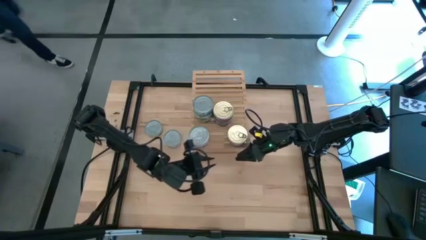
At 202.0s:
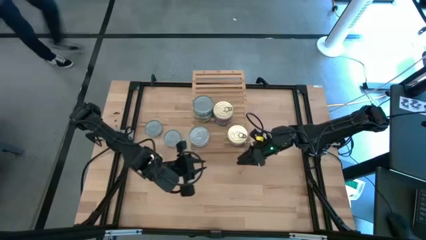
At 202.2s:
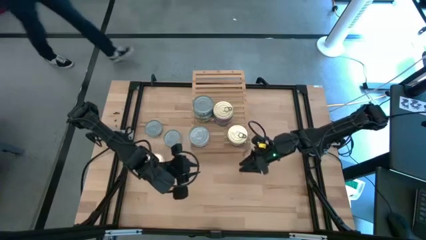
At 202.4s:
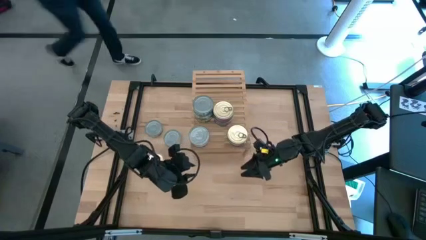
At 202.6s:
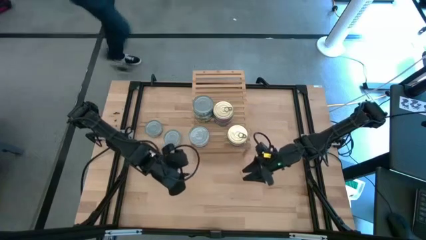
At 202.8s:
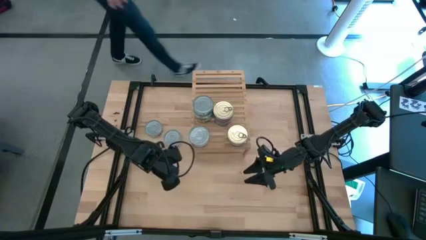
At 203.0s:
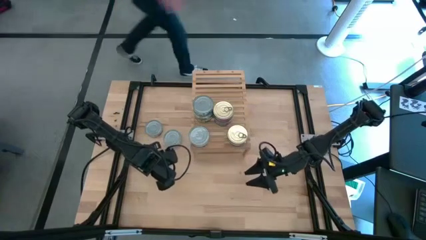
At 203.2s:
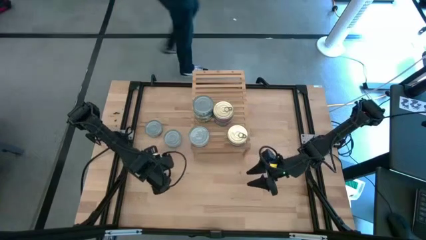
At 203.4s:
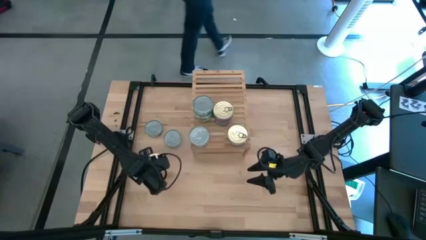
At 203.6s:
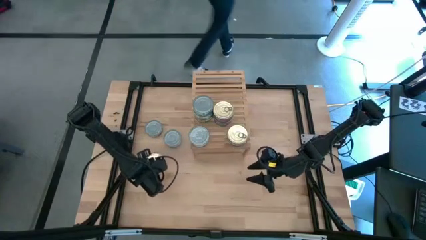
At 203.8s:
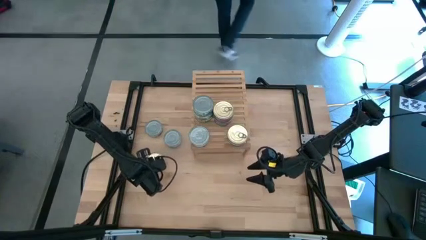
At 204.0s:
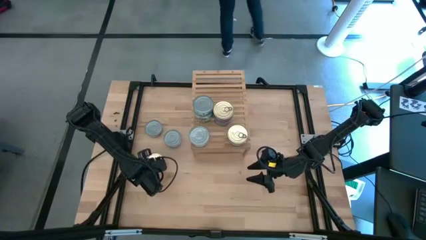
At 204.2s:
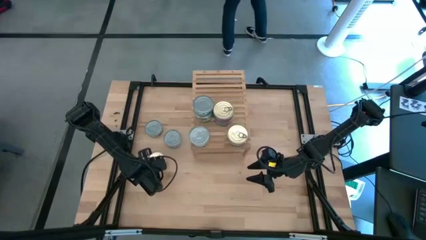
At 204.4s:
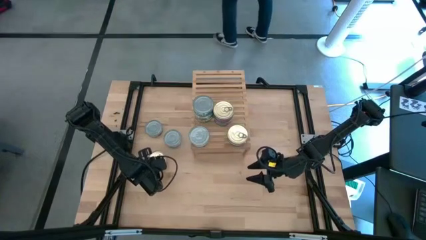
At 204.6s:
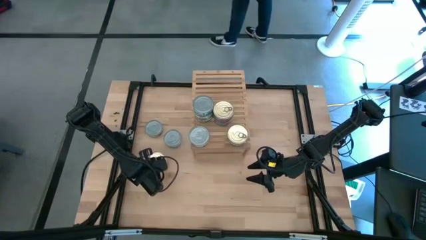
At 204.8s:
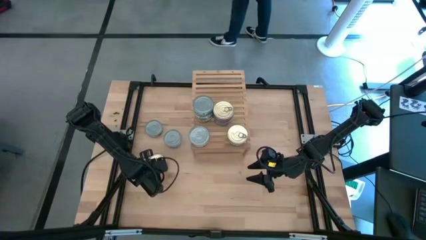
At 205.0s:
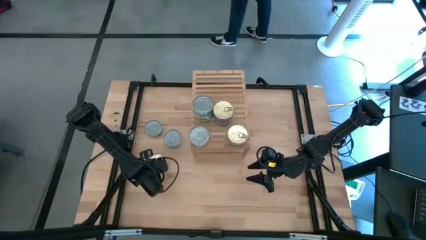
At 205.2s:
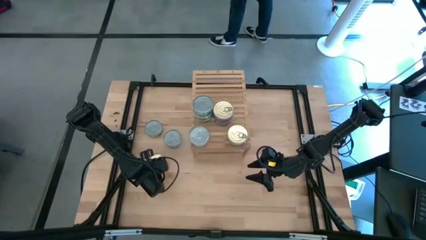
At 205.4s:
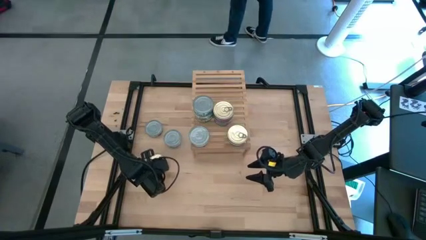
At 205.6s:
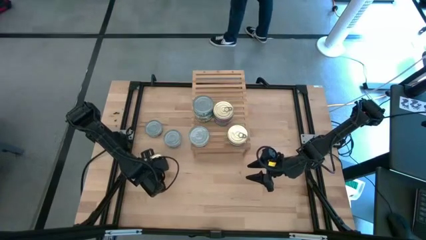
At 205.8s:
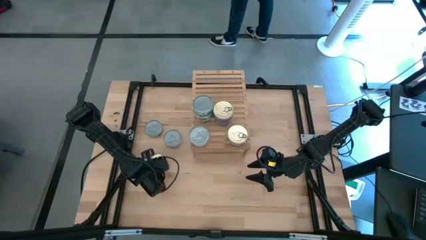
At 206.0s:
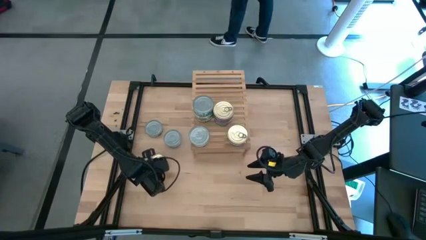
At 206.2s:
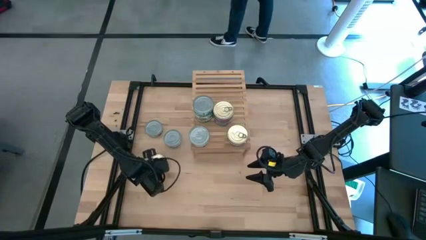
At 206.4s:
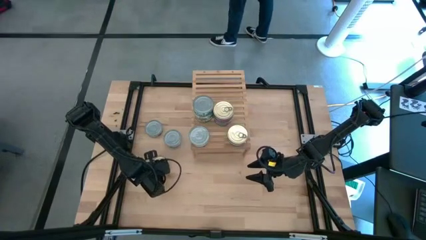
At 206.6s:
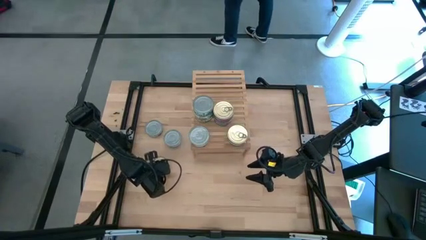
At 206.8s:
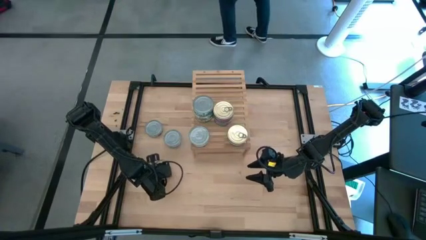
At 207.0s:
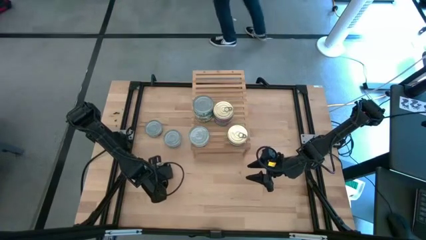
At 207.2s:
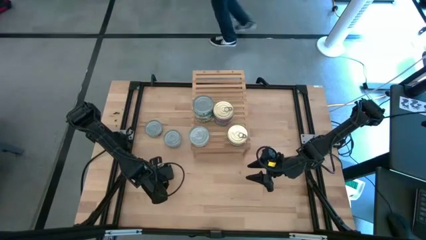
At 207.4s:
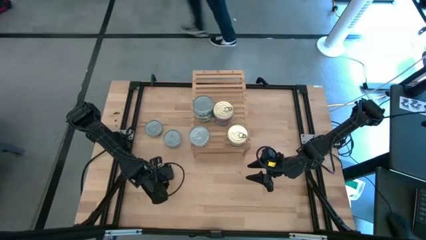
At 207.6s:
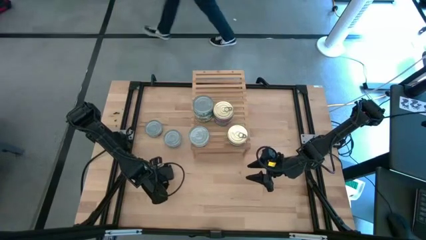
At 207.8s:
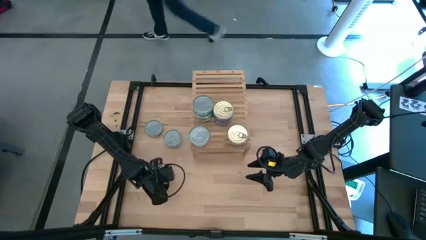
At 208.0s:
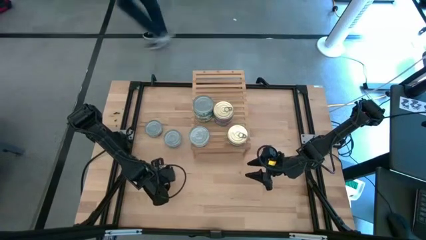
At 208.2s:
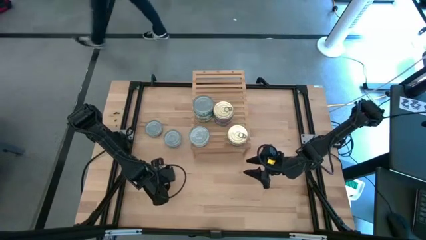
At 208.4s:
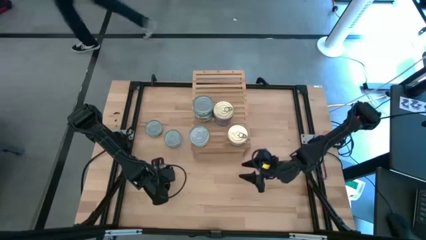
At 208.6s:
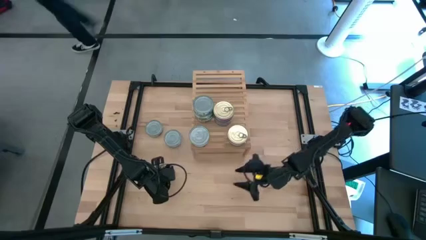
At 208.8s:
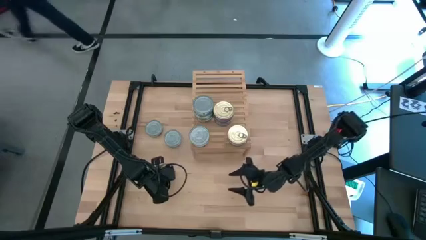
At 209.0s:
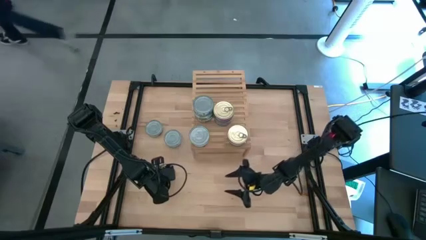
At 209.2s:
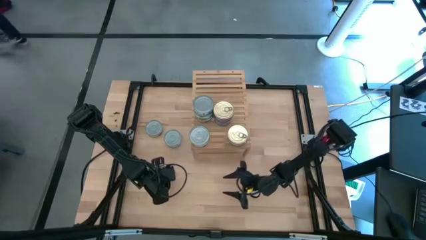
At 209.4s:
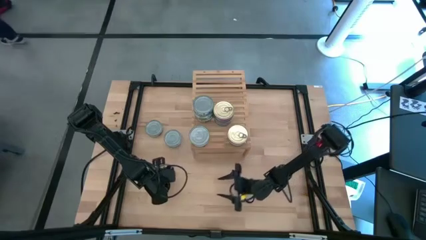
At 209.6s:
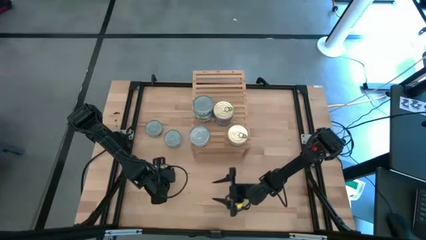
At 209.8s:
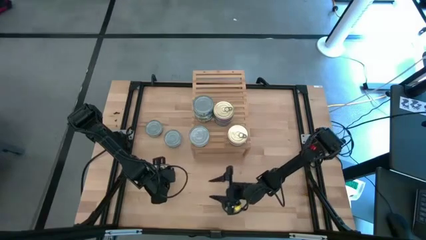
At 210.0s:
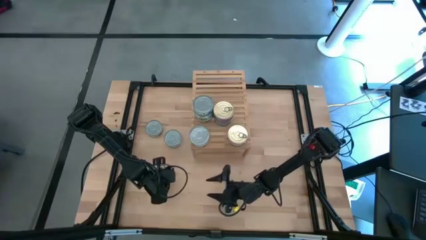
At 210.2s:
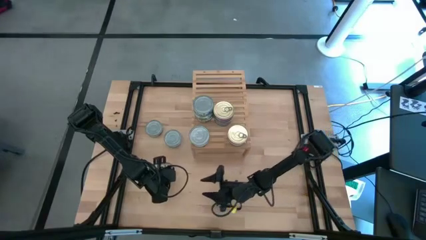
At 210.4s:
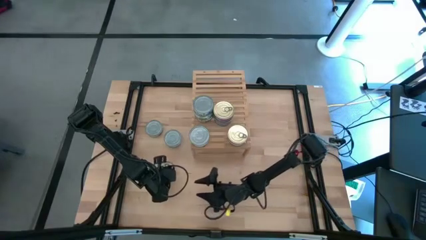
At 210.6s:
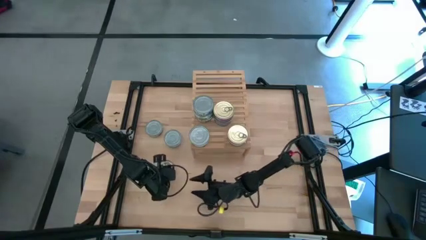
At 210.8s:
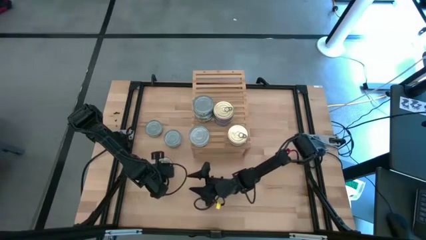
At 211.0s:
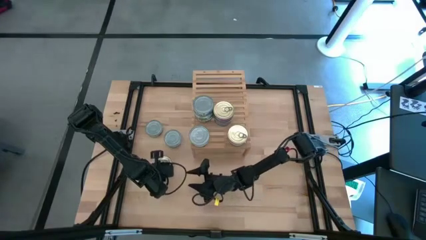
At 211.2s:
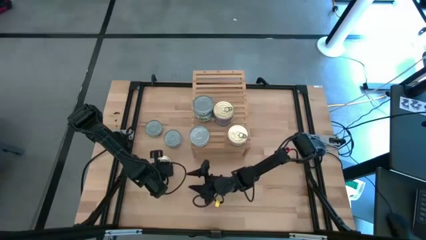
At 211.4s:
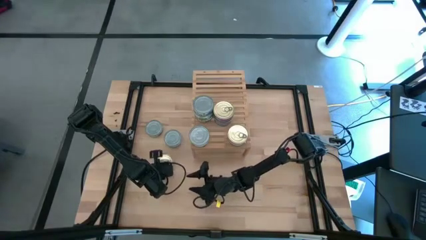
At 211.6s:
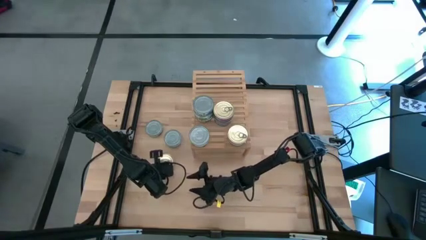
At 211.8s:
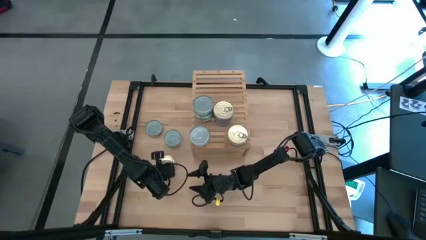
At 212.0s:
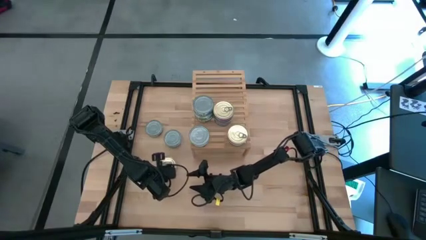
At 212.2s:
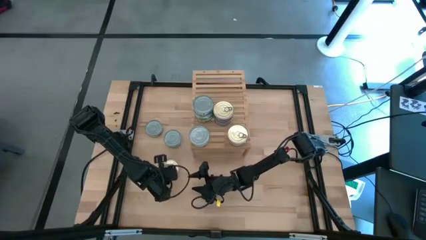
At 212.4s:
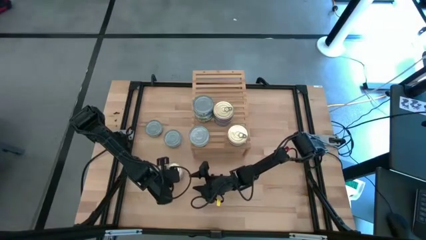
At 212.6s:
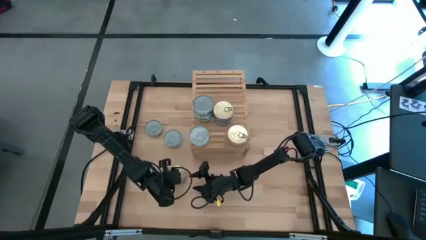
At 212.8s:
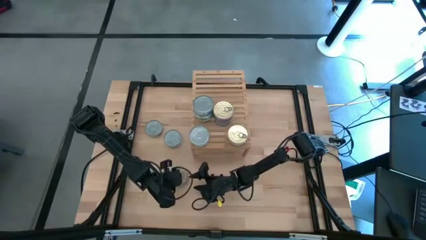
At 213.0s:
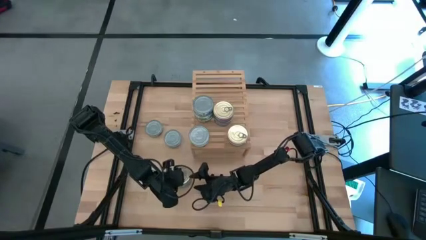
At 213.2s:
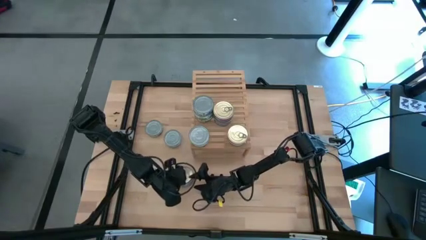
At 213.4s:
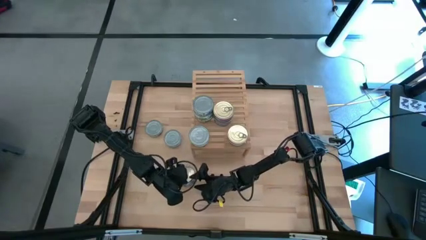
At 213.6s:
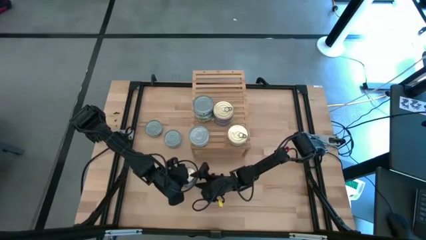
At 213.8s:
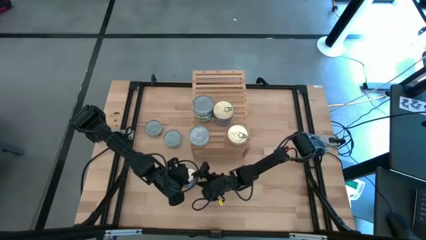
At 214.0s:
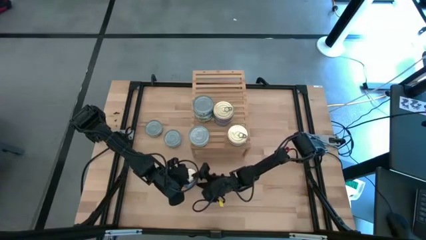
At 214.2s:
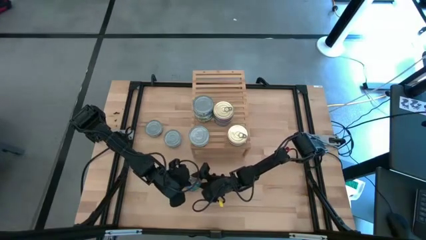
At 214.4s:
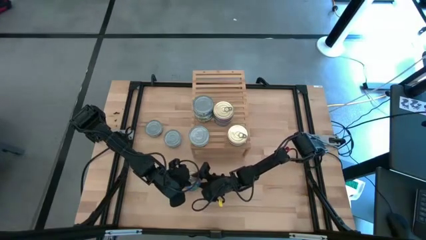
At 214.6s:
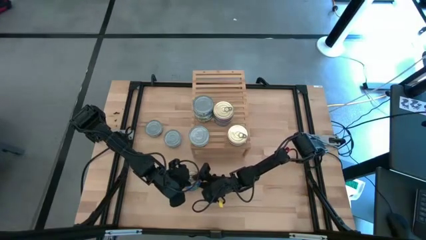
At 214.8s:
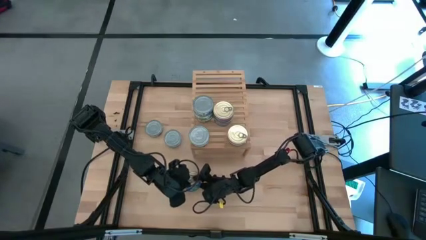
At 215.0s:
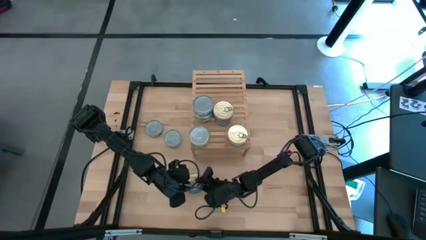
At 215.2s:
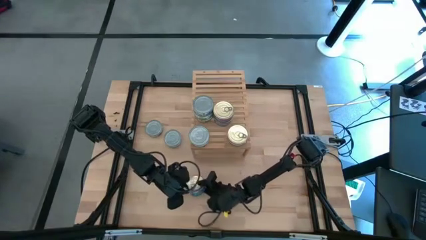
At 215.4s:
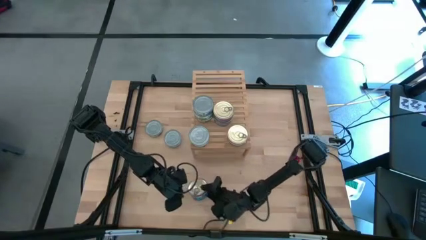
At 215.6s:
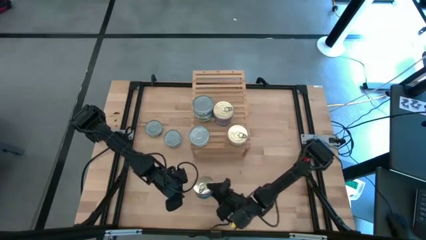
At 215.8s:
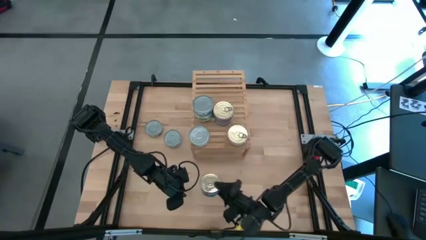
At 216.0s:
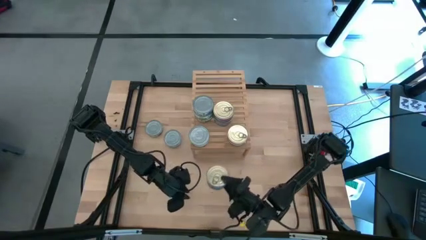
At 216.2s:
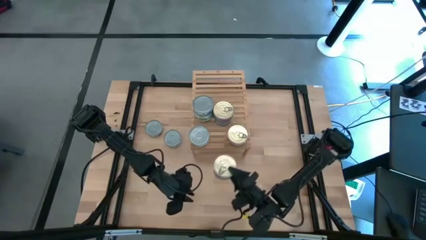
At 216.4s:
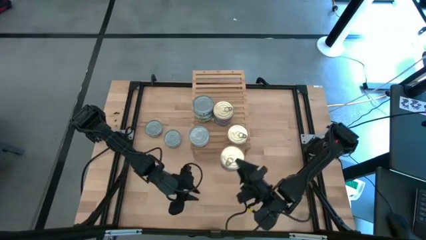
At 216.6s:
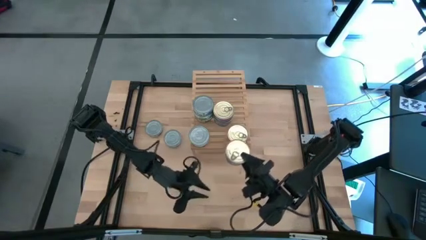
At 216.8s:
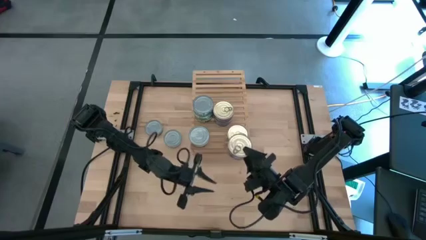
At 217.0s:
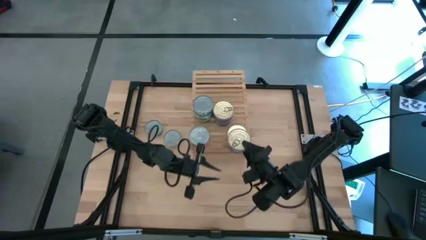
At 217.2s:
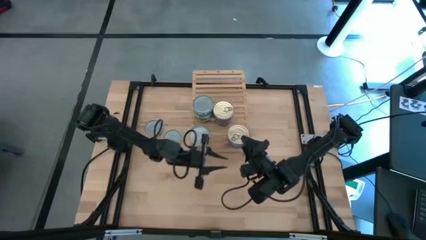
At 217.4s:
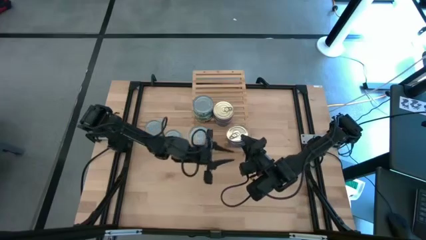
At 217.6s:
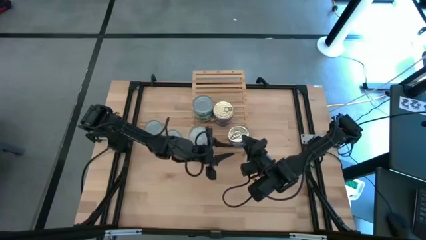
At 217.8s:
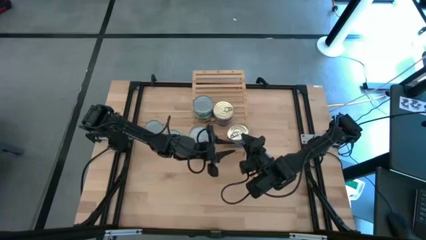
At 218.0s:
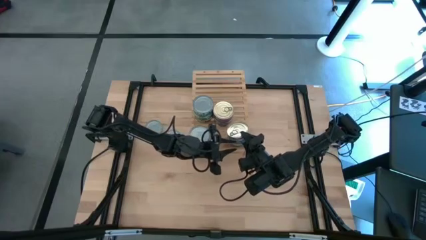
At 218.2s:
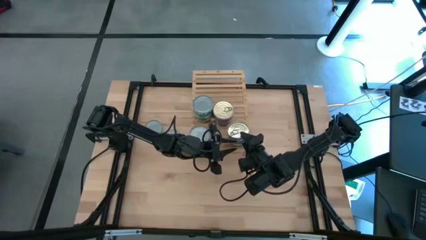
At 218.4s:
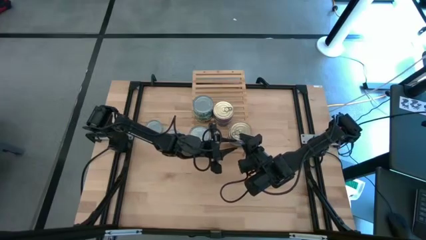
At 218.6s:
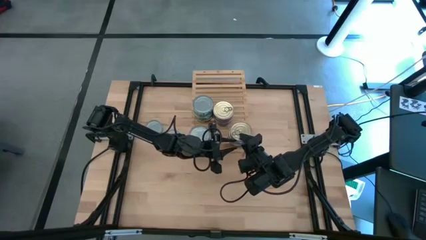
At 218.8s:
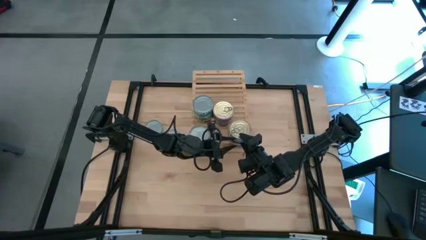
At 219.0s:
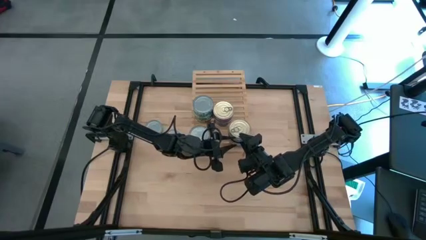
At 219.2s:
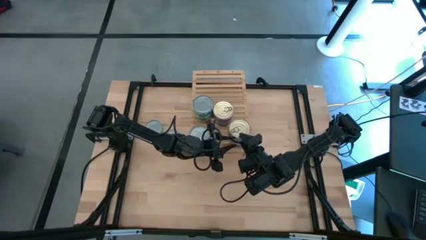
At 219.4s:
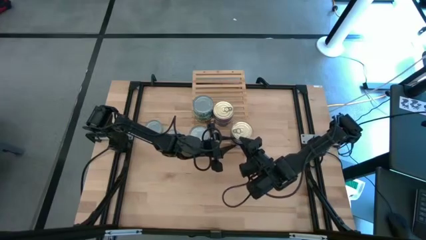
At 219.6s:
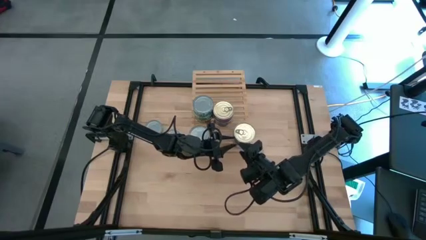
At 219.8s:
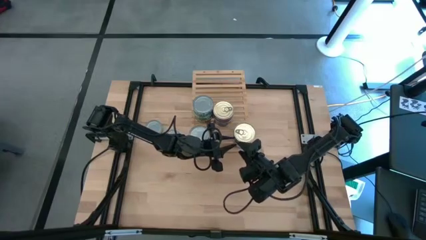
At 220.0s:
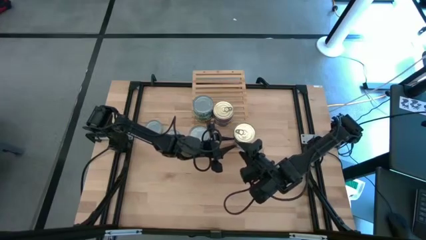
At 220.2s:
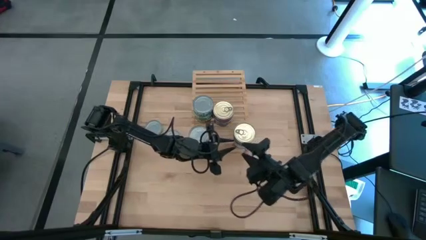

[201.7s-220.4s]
Task: Stack canned seafood by type on shelf
Stack the blue tuna can on top of the blue tuna can on the shelf
